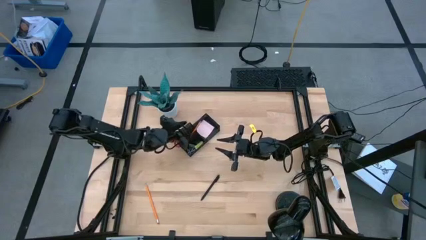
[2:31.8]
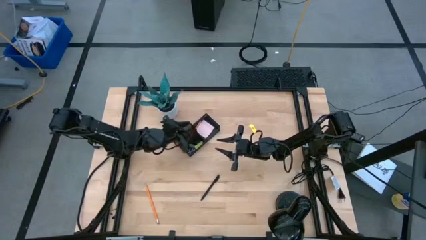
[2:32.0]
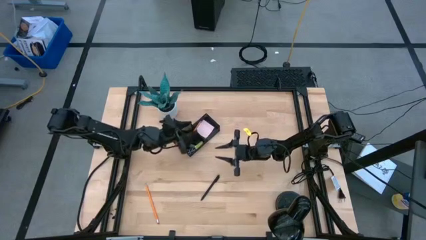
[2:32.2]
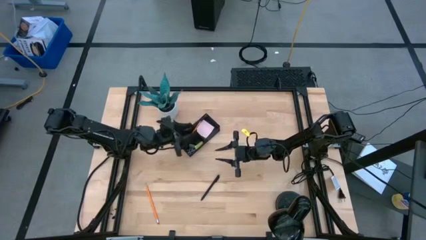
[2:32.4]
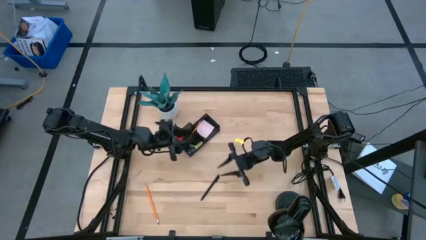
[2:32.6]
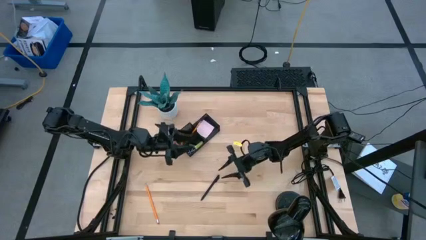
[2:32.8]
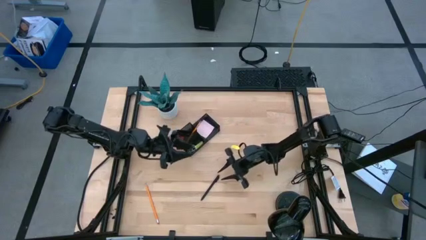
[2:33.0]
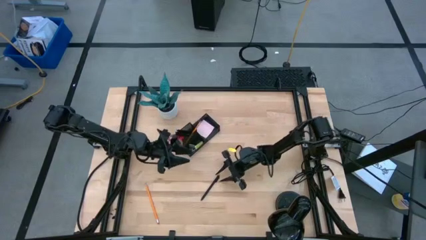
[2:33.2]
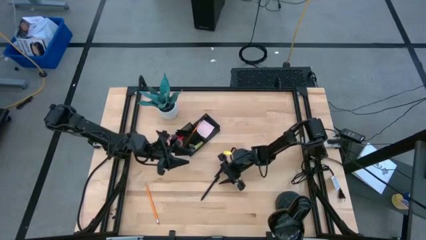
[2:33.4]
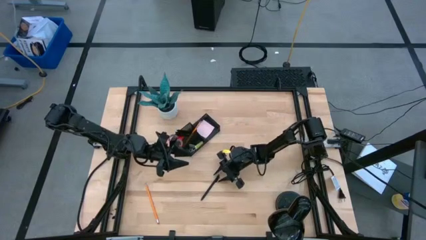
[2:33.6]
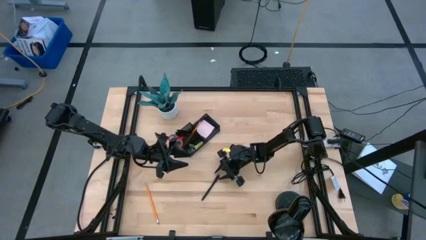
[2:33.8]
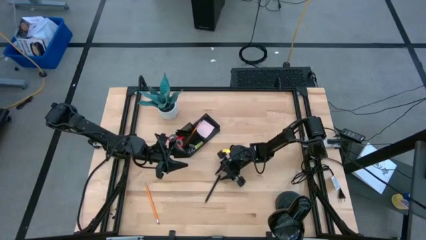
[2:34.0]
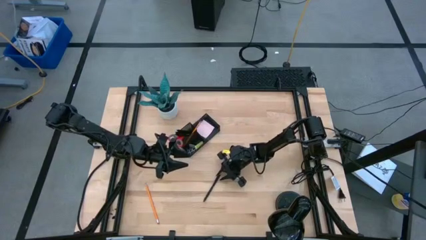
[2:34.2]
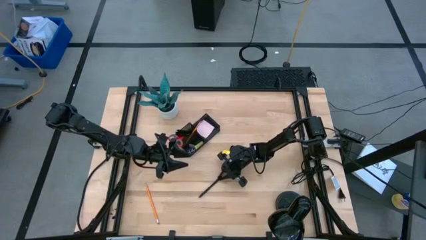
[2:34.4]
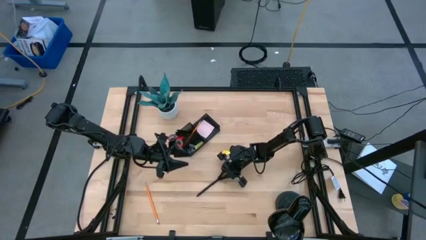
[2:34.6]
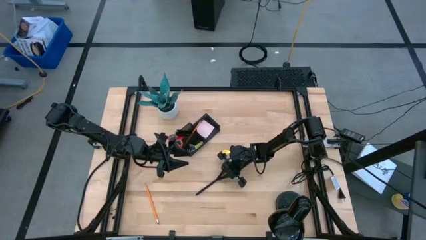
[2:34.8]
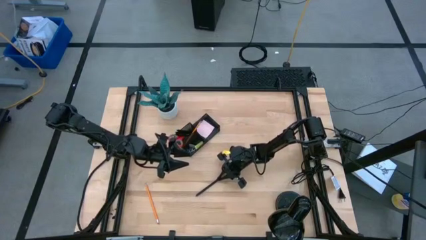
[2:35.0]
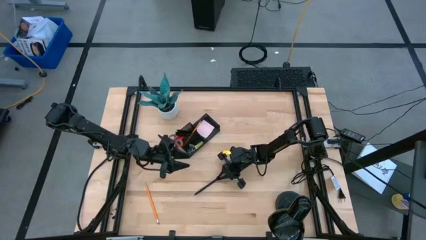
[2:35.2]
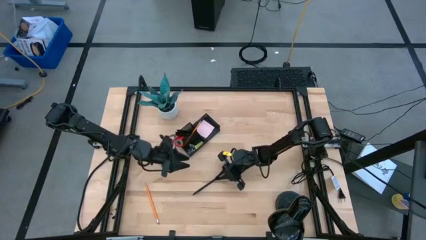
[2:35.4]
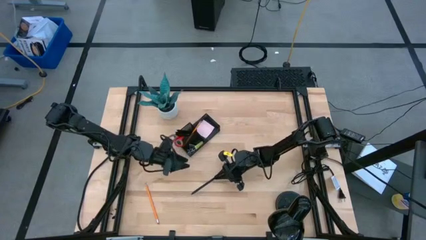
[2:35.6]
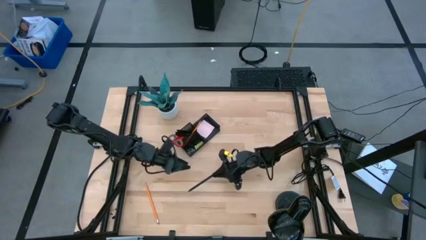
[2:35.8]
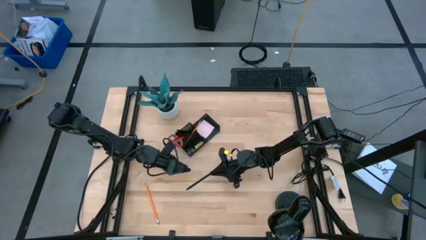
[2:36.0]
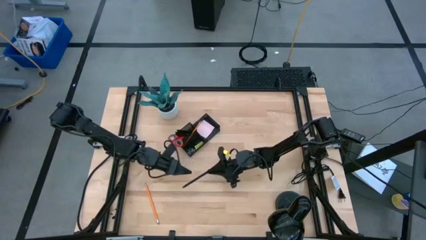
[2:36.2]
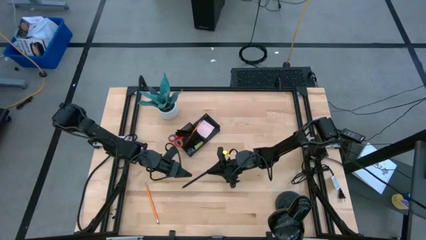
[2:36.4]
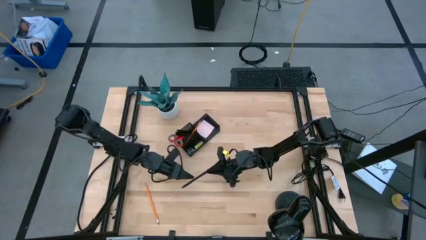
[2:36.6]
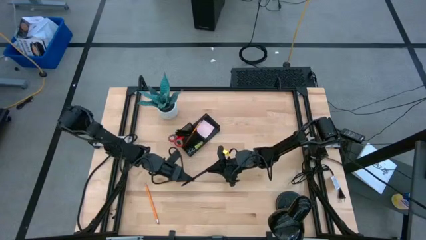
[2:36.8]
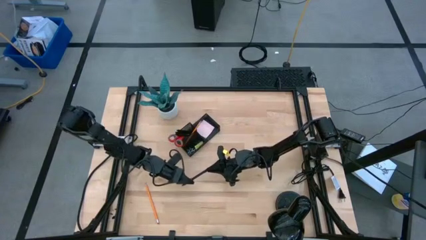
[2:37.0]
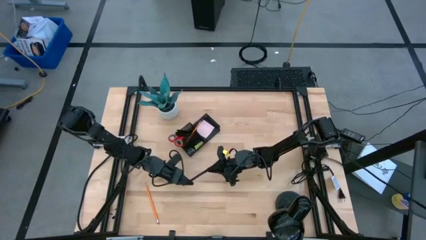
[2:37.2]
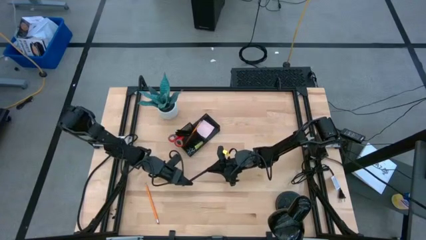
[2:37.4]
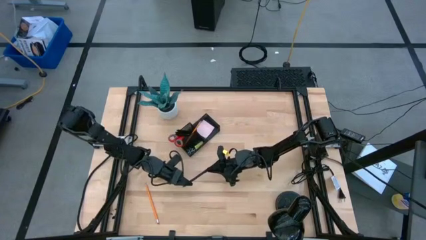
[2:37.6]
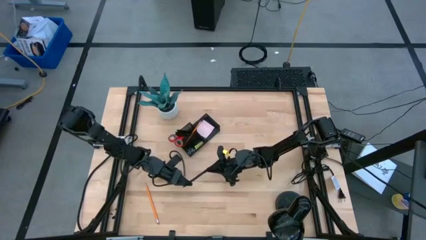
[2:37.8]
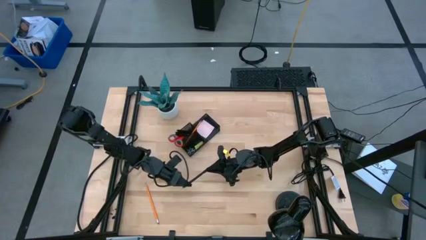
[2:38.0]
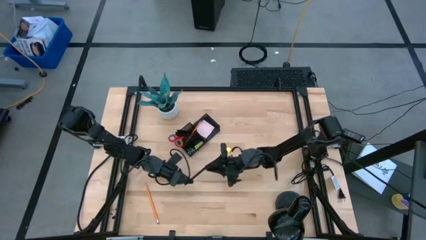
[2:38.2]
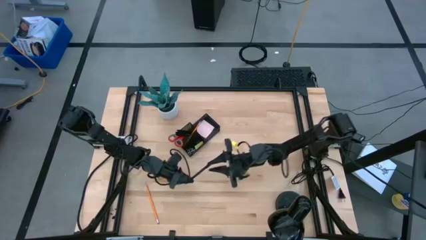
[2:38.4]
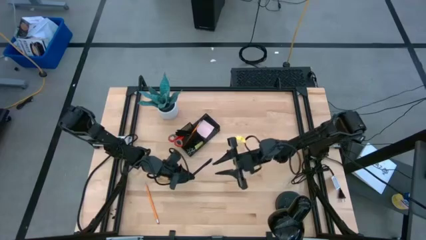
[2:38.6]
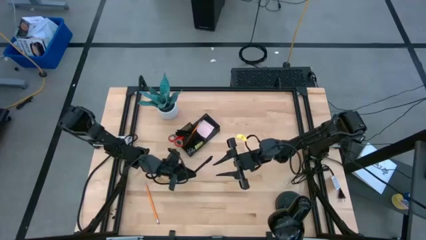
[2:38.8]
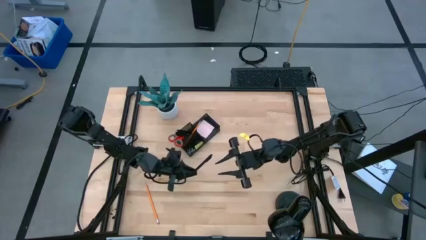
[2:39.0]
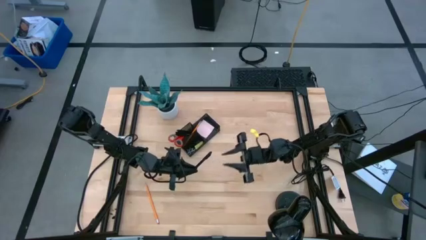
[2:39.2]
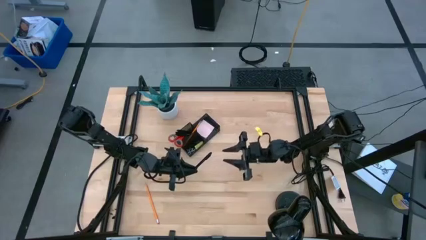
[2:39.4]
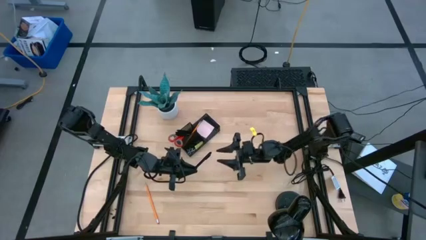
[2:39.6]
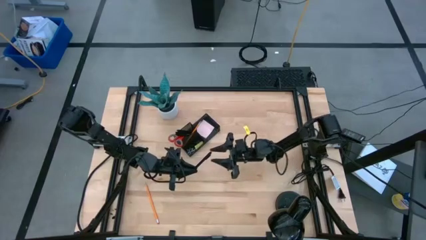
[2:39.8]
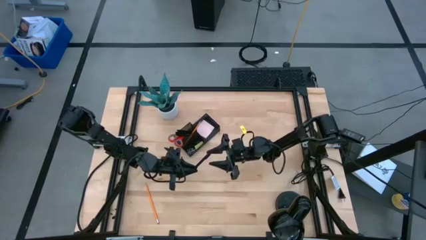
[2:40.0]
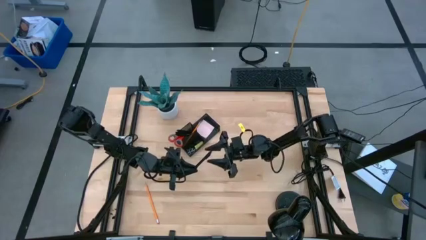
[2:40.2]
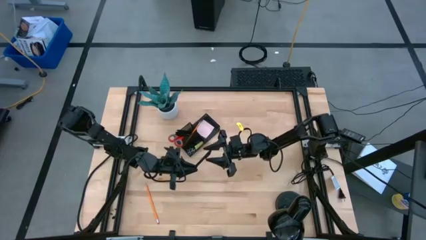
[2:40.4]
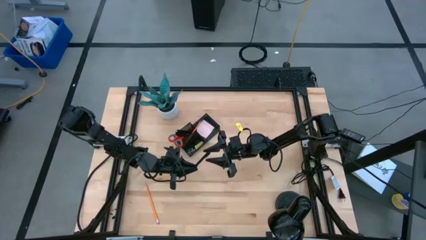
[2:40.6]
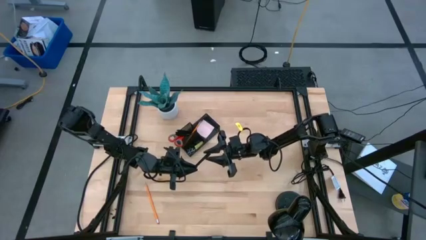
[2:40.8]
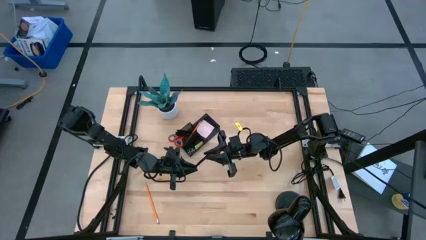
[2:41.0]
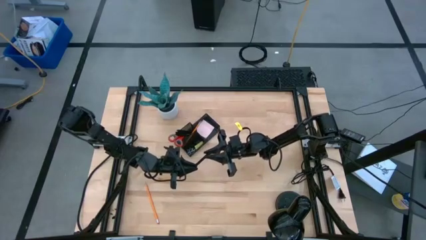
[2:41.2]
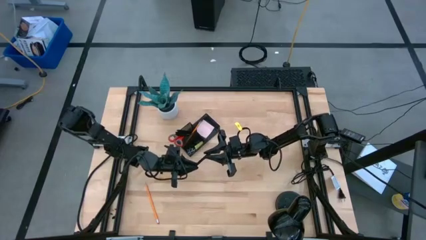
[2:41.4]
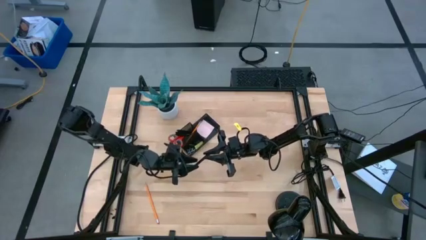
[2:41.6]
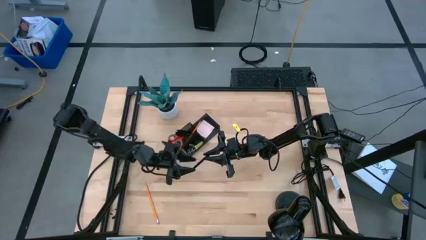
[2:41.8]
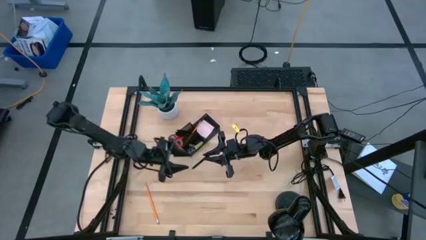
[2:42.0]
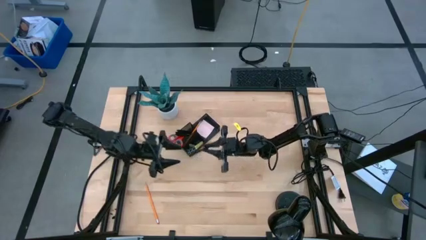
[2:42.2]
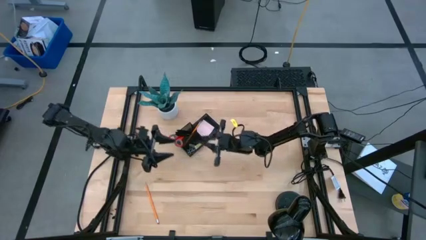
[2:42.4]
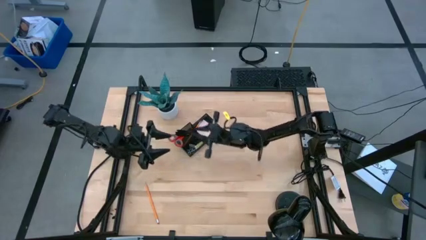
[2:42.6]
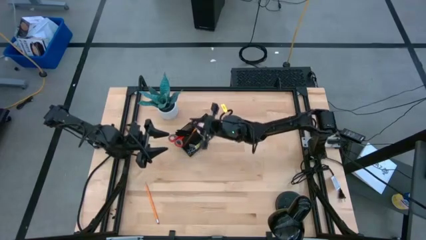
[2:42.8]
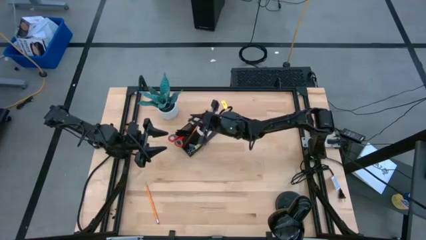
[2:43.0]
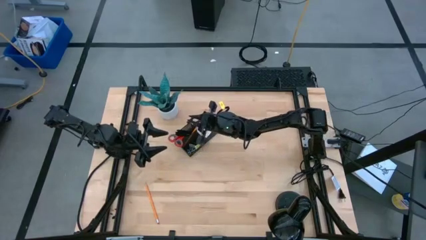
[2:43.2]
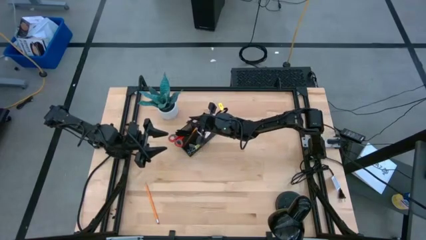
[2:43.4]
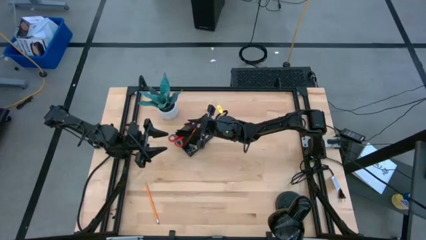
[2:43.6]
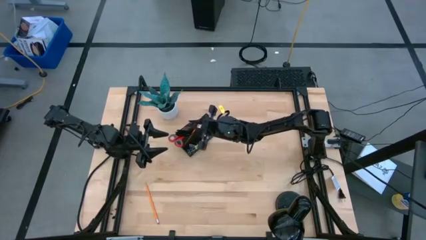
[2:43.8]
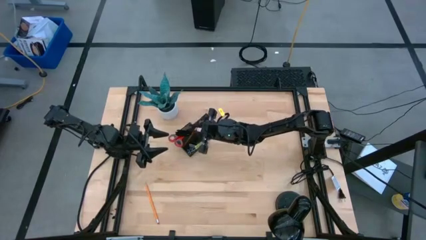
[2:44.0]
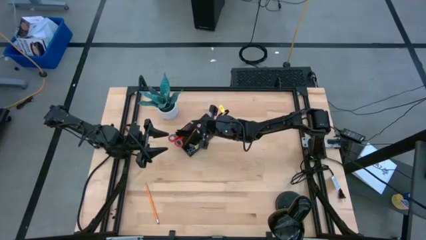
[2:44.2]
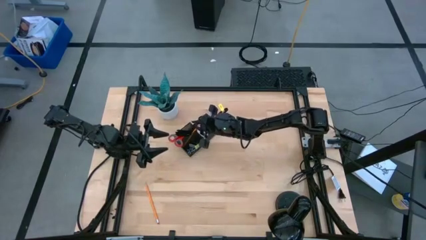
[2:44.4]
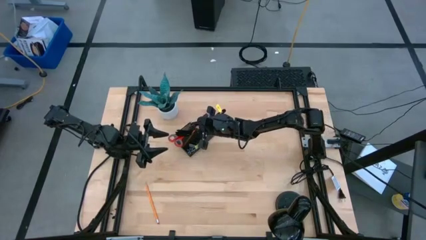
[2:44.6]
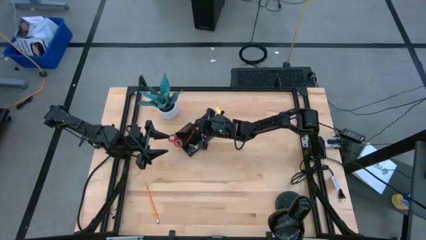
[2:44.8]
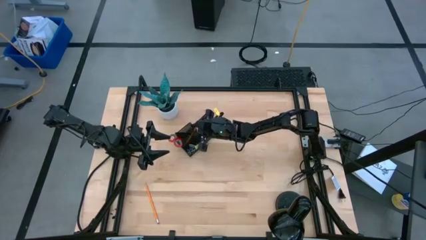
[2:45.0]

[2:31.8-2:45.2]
Task: Pick and place office supplies into organizer
Put the black pen into the black desk organizer

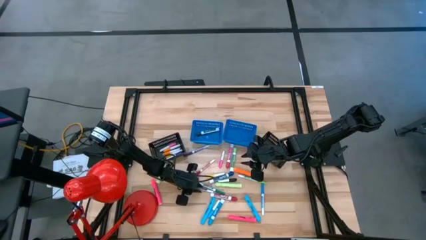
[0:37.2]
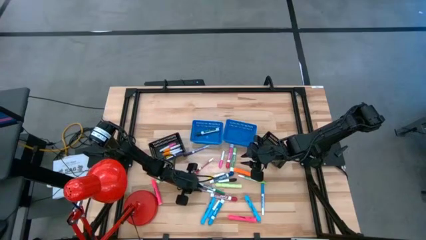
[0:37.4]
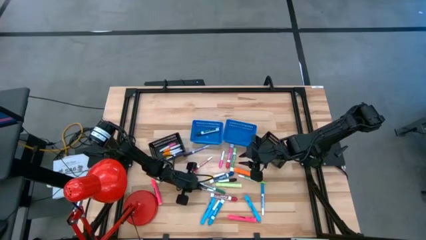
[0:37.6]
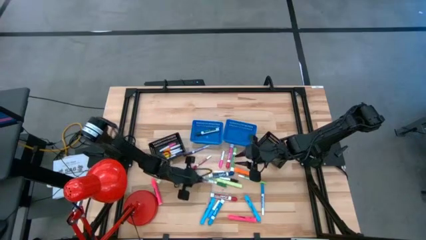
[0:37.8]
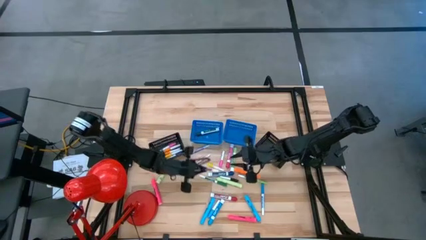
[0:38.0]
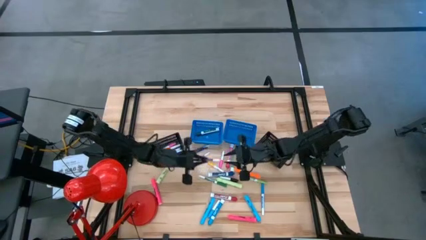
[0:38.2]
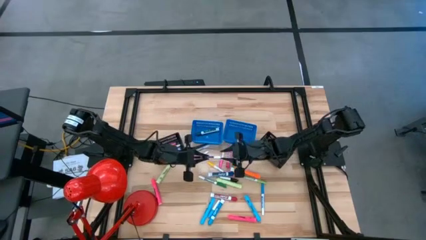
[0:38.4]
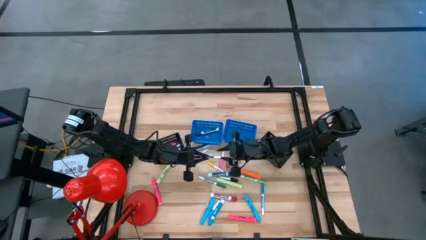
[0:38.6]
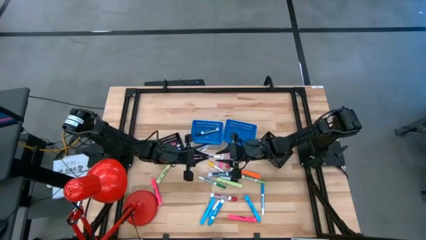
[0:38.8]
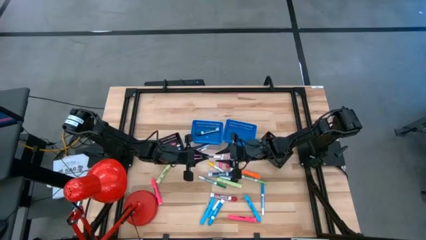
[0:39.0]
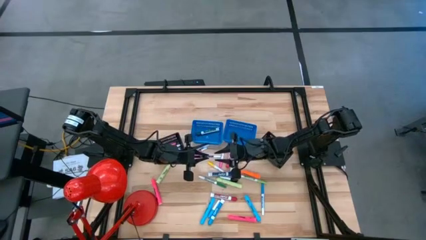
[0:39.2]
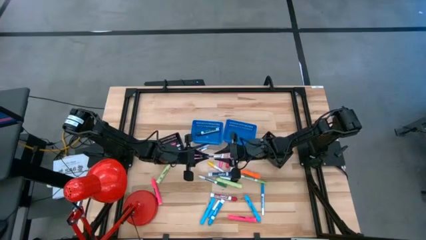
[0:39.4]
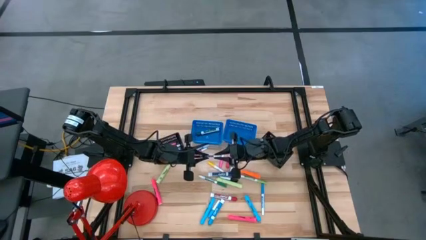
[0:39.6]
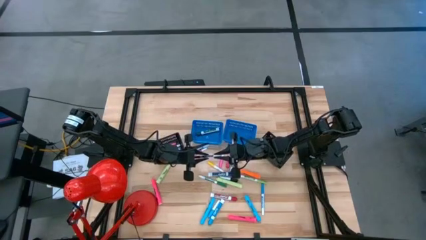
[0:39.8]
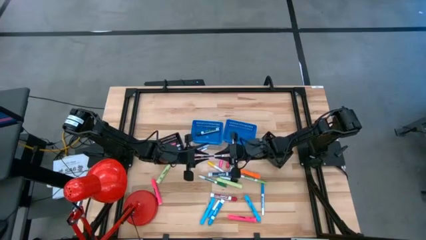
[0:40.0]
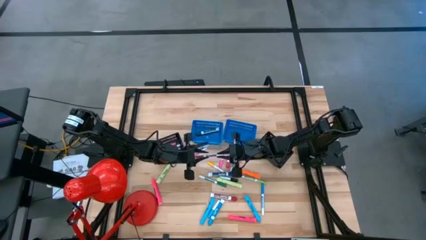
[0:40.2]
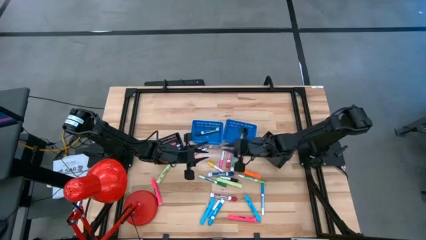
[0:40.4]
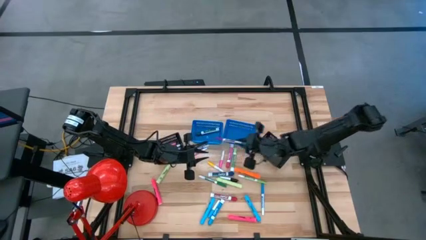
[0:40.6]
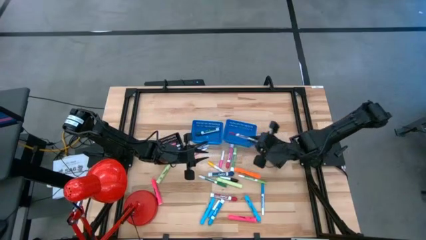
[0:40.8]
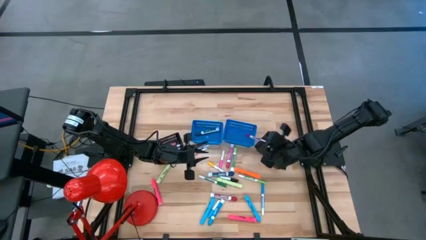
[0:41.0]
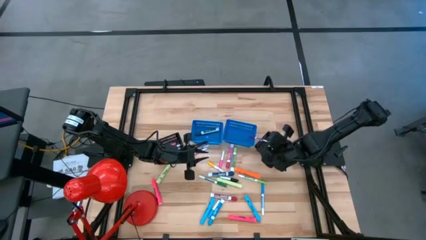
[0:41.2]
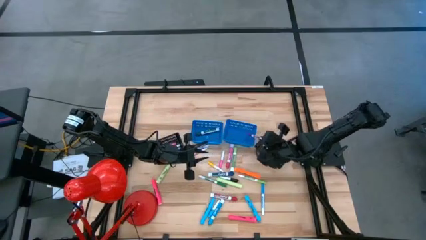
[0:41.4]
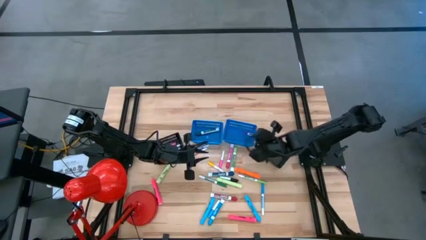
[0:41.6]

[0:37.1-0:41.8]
Task: Pick & Place Markers
Put the purple alcohol marker into the right blue bin
